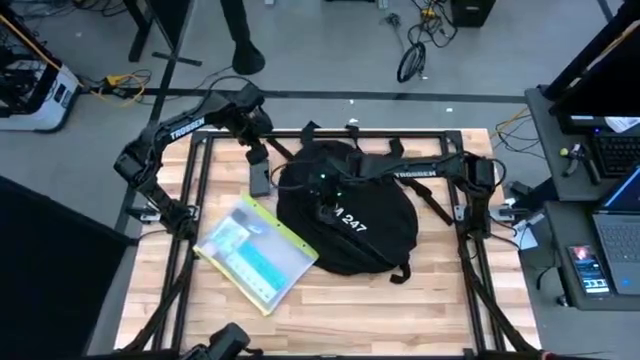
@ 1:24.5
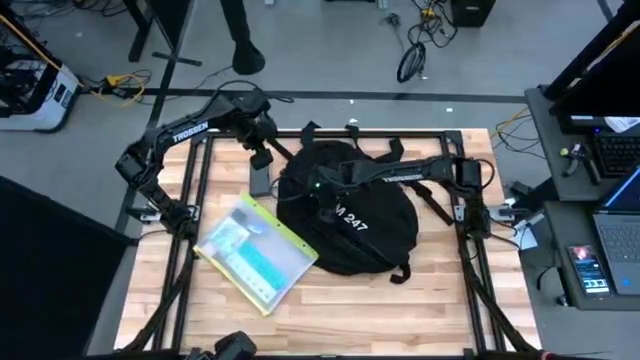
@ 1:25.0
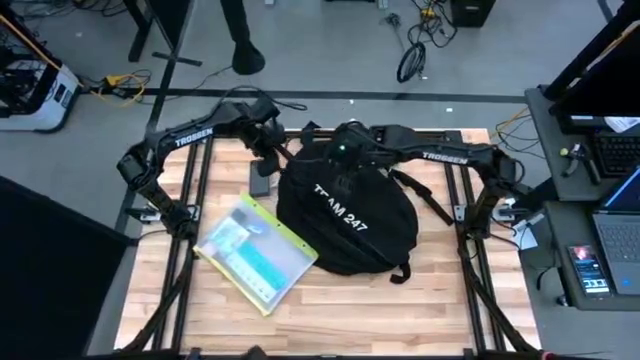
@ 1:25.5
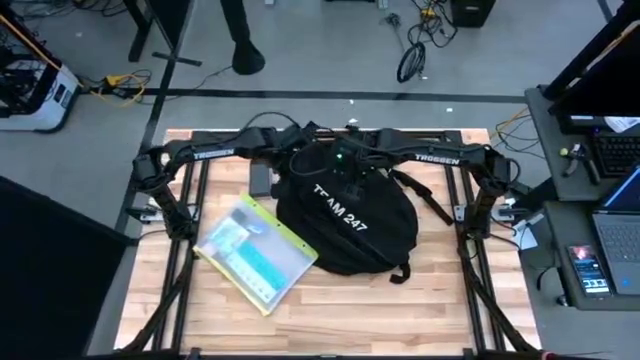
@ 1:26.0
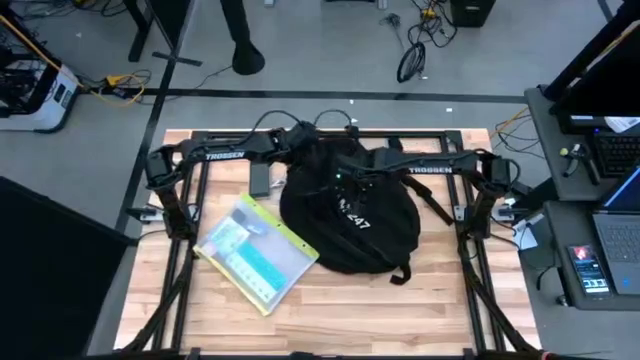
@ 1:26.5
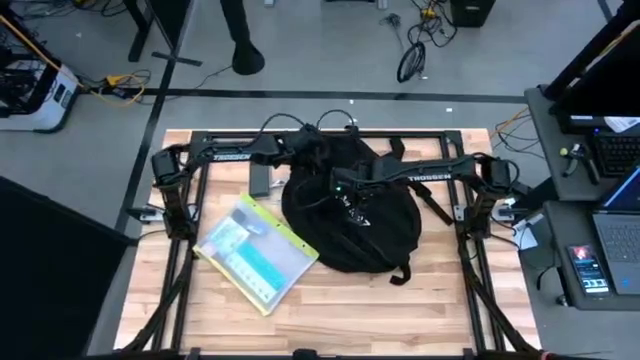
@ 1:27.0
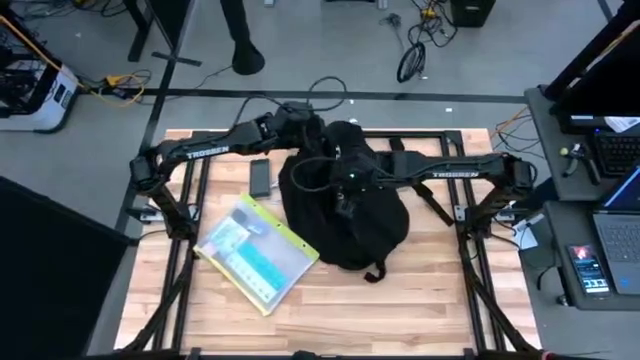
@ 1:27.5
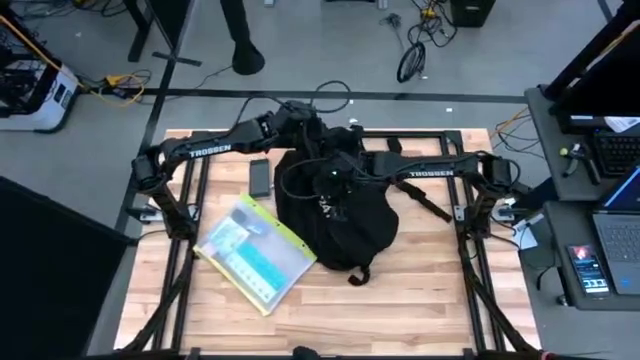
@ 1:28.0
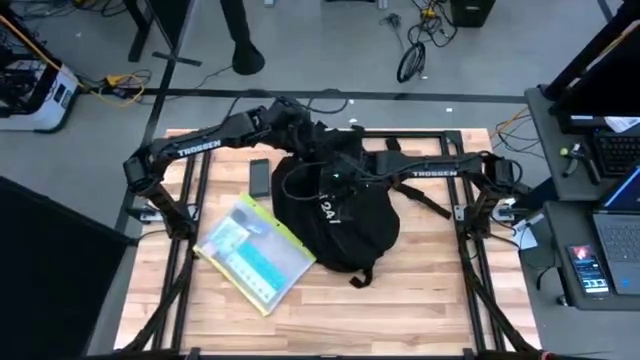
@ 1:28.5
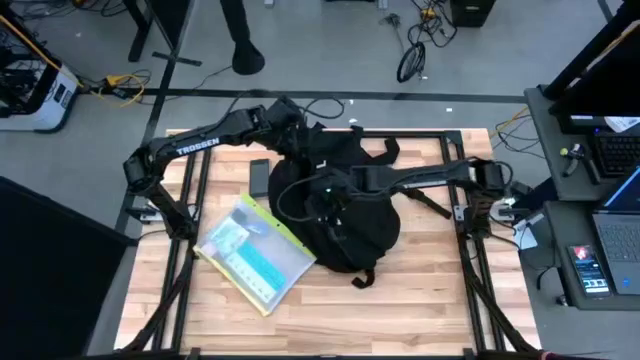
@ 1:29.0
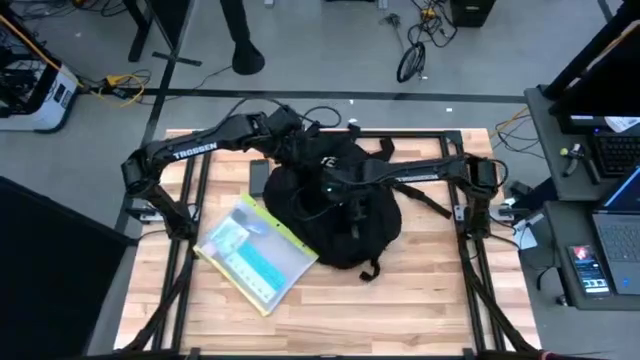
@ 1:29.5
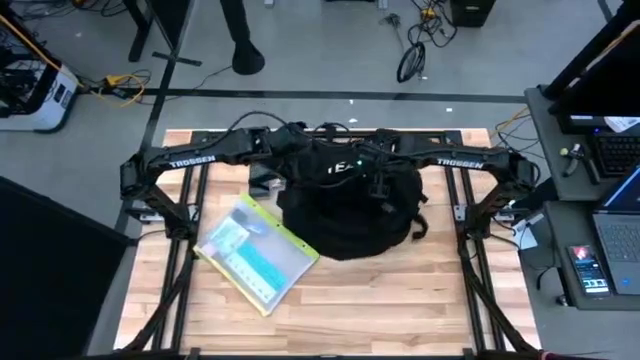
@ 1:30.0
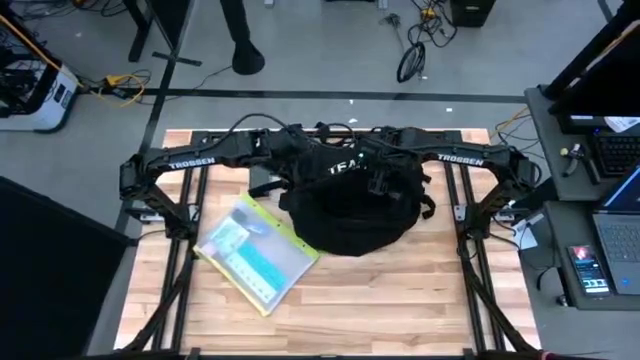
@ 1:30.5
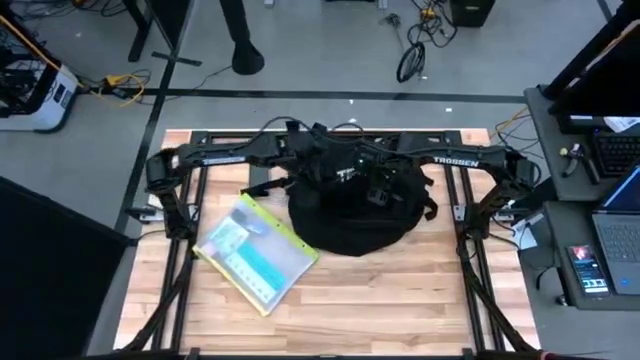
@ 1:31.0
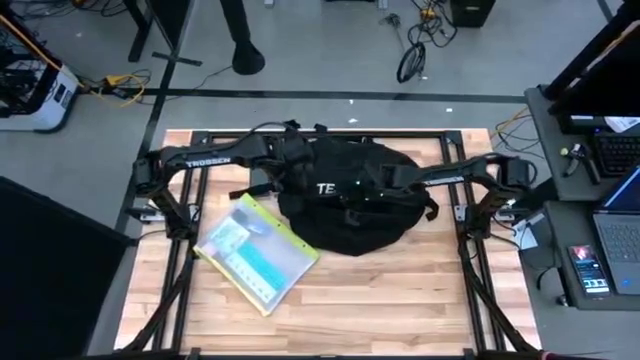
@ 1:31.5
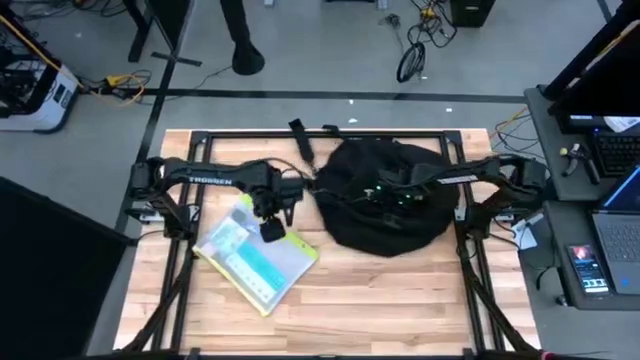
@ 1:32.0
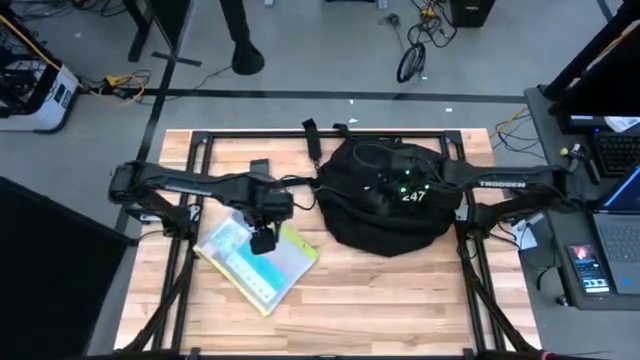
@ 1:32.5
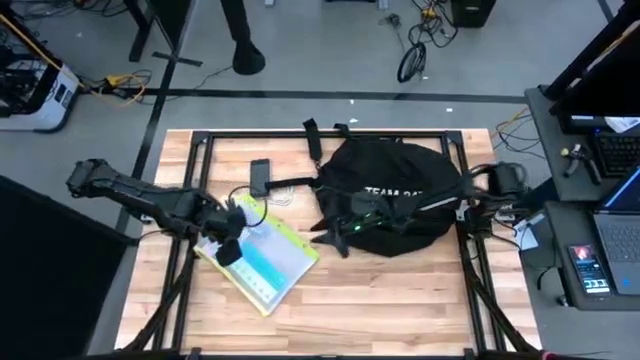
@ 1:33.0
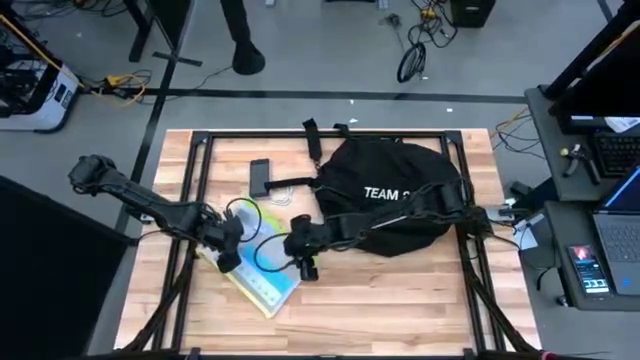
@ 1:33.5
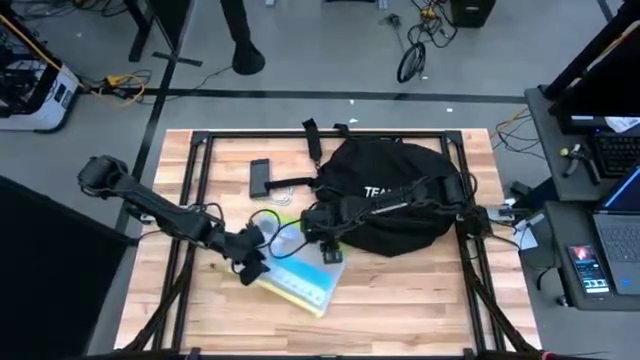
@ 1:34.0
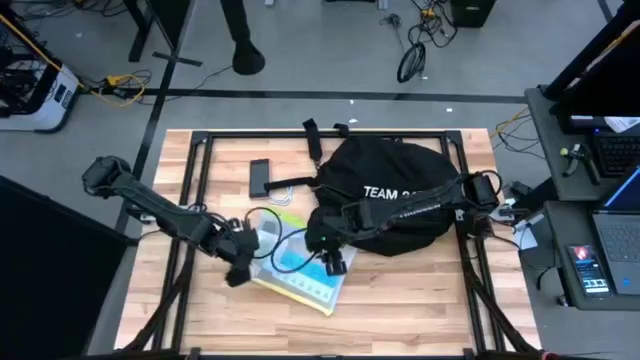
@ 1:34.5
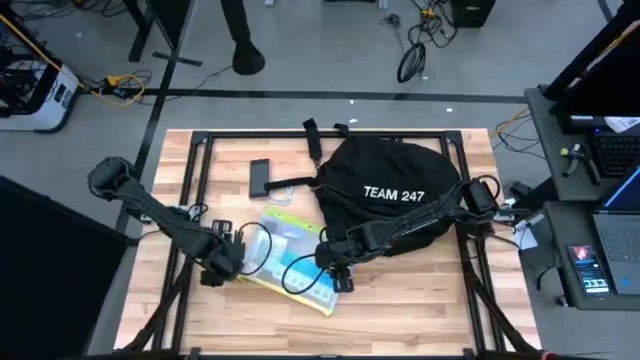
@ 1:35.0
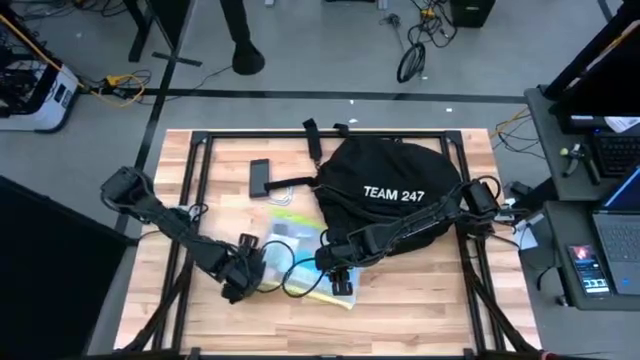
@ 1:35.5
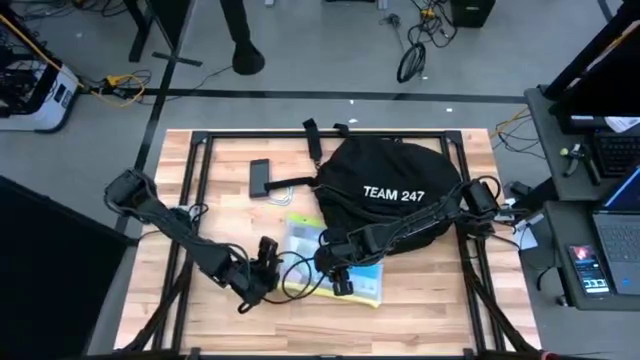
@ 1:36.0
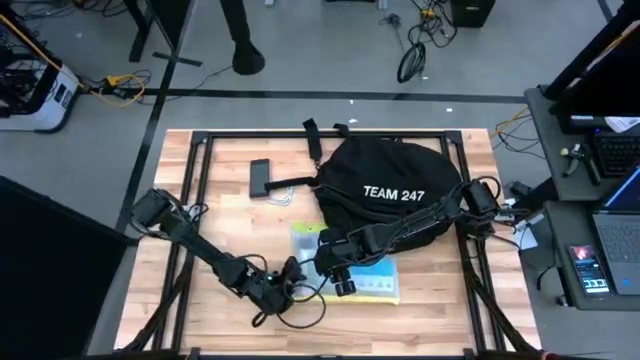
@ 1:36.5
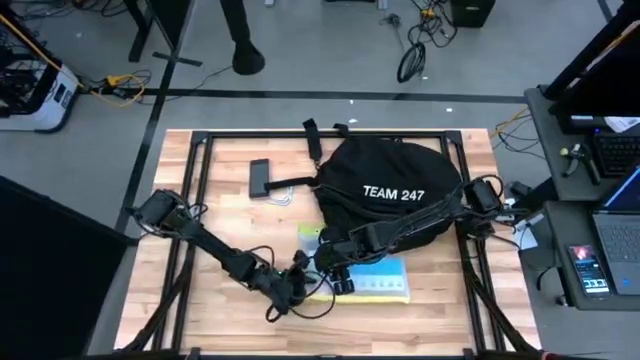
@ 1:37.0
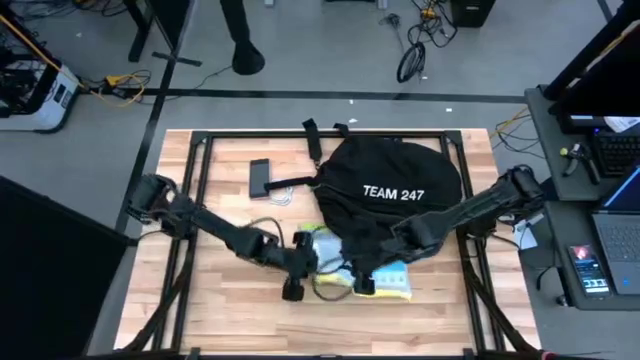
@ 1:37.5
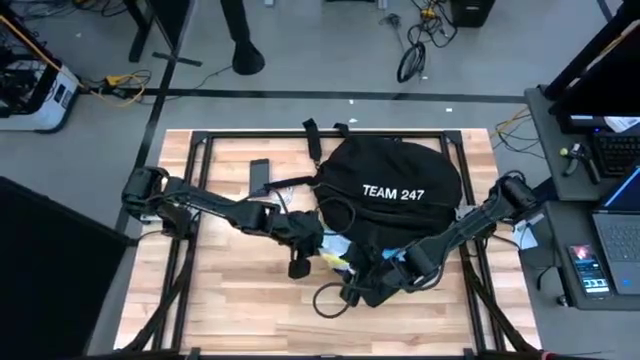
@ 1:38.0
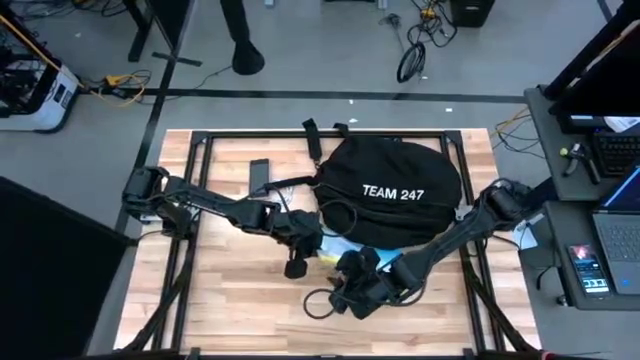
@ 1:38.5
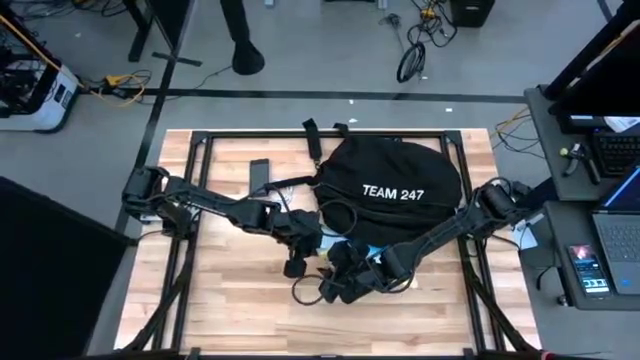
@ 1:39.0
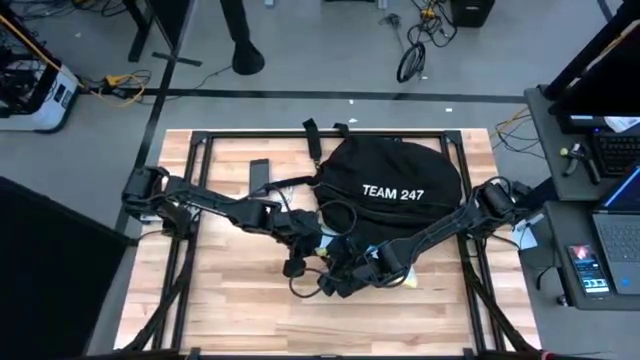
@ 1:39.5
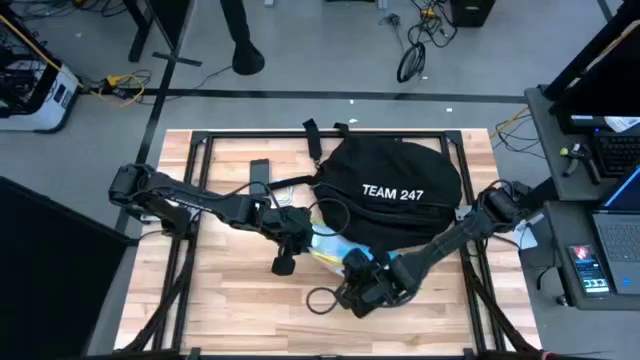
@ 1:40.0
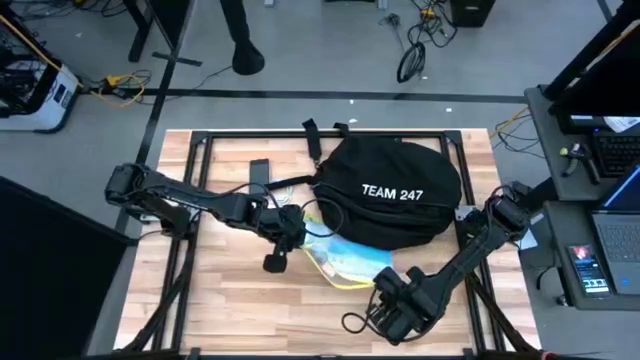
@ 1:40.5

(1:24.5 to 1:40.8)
Task: Unpack backpack
Open the green zip bag

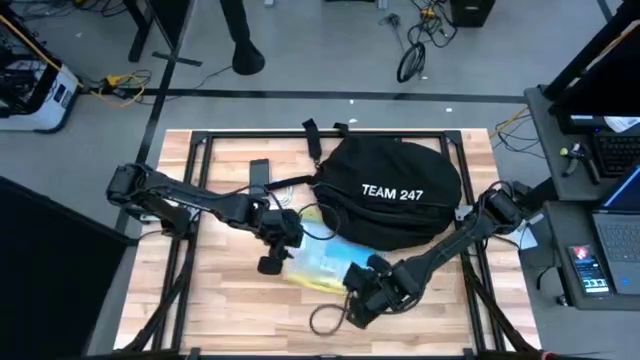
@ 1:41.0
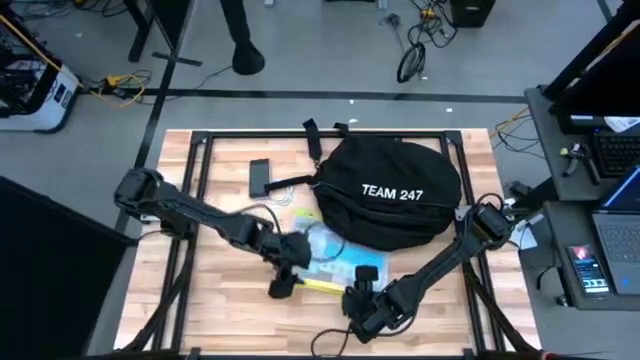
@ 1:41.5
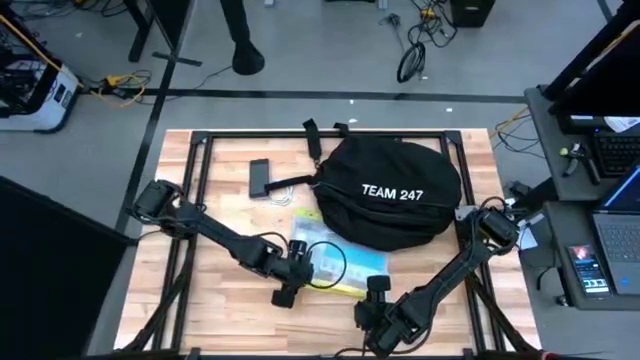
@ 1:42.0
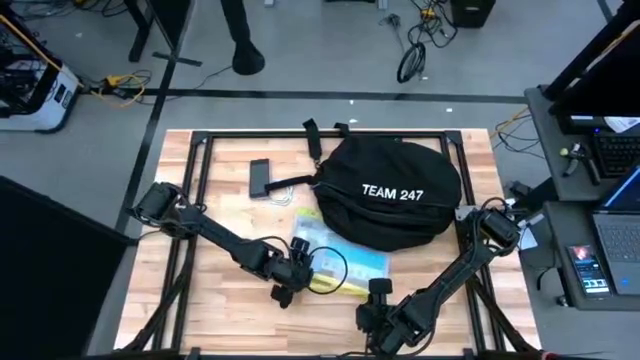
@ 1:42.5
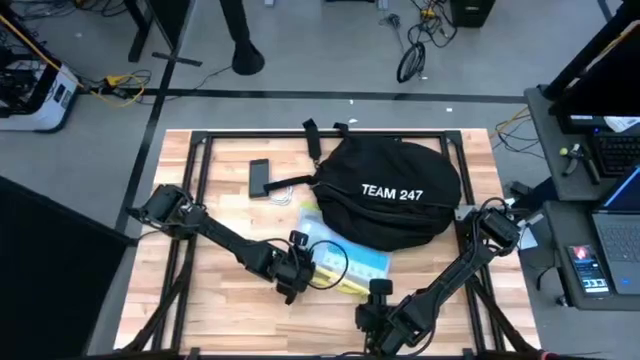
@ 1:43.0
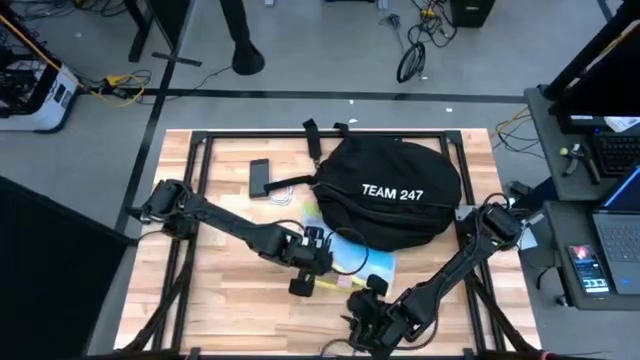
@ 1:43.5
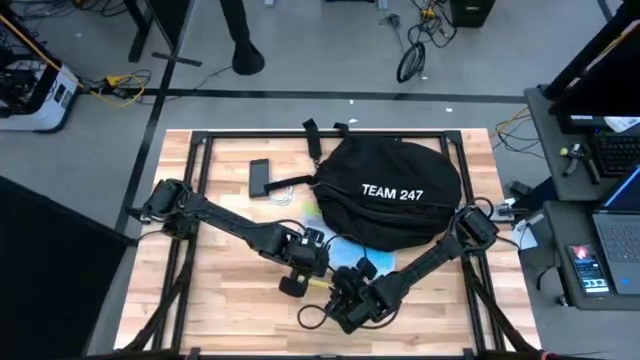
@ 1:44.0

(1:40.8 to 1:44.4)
Remove the pink charger adapter from the green zip bag

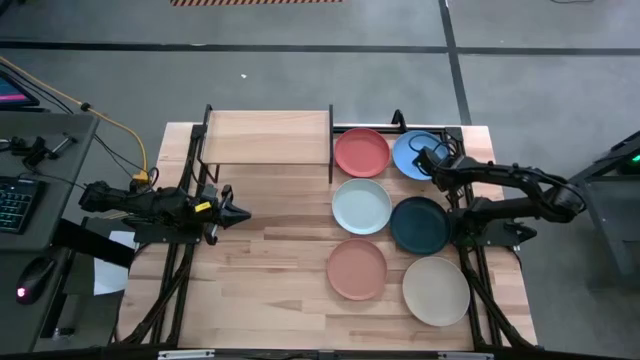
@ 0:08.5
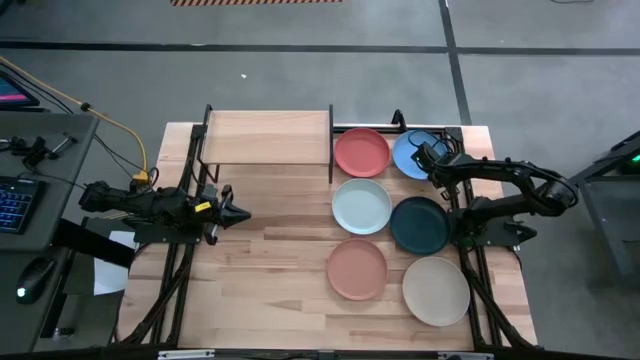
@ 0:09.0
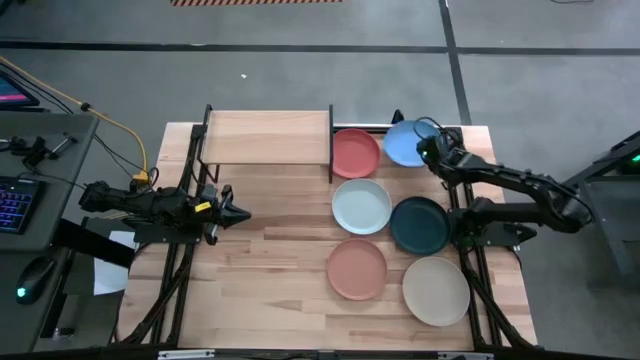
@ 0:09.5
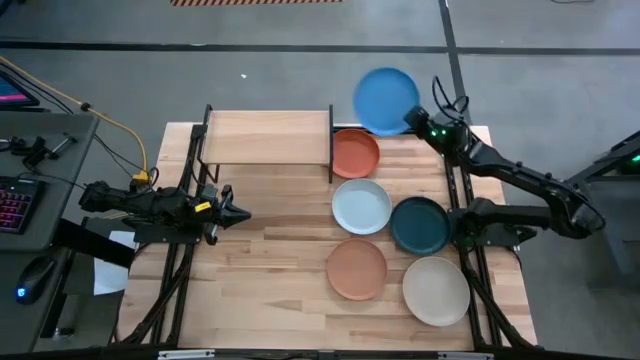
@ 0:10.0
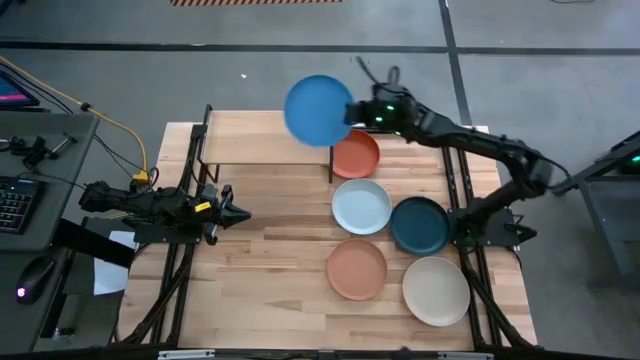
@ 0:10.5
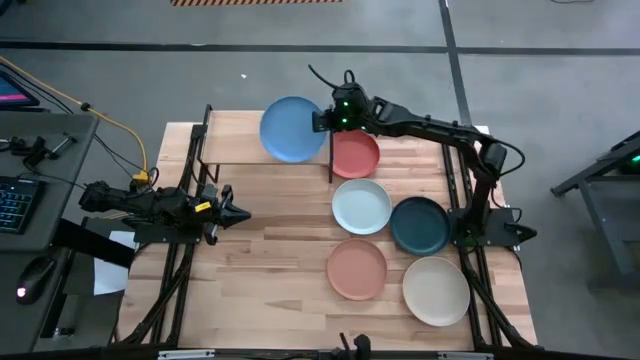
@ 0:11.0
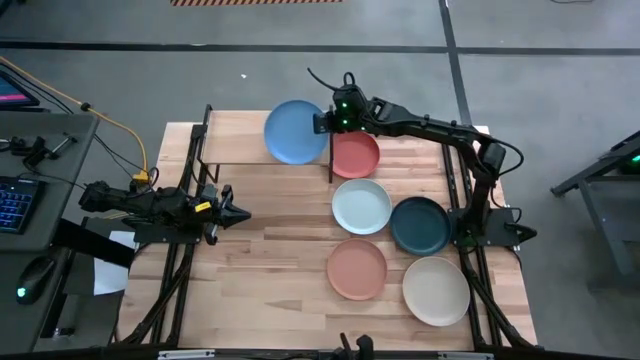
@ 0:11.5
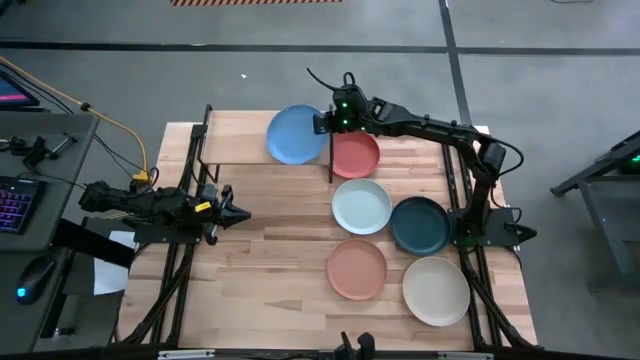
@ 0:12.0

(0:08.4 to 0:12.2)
Task: Place and stack plates onto a shelf
Put the light blue plate on the shelf
